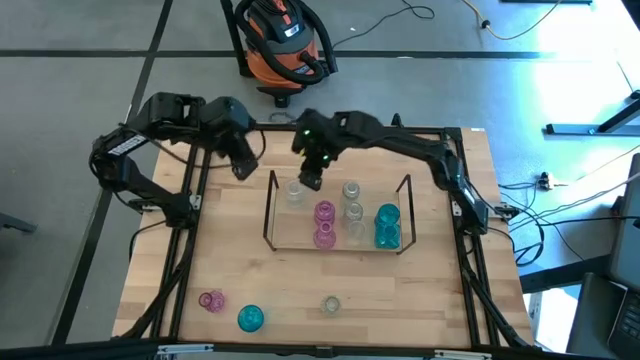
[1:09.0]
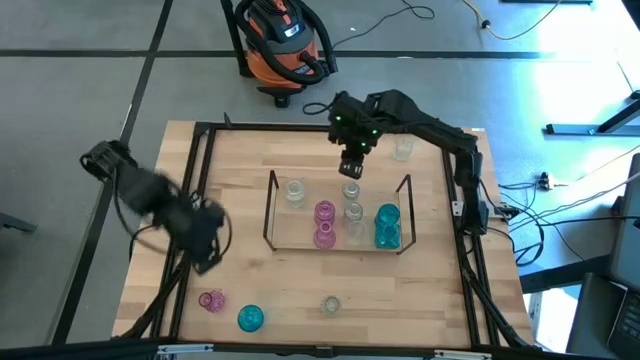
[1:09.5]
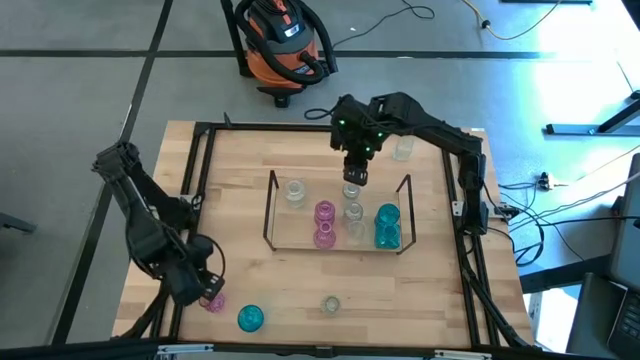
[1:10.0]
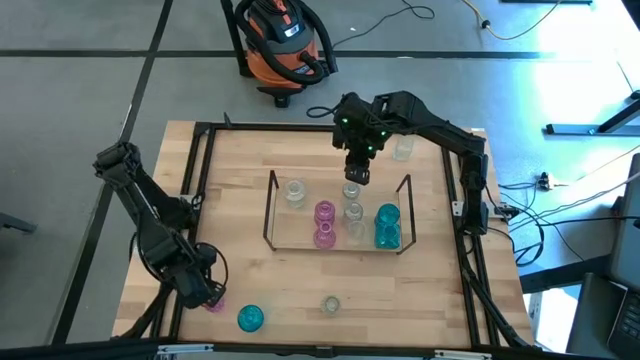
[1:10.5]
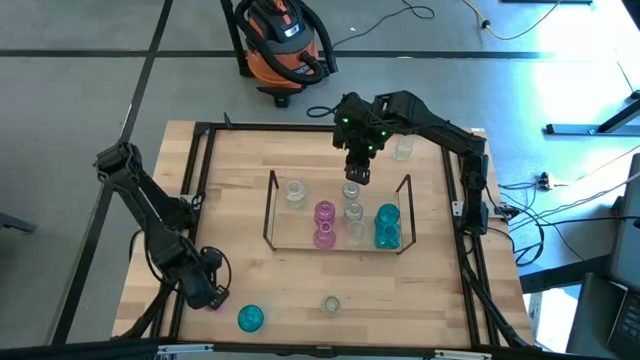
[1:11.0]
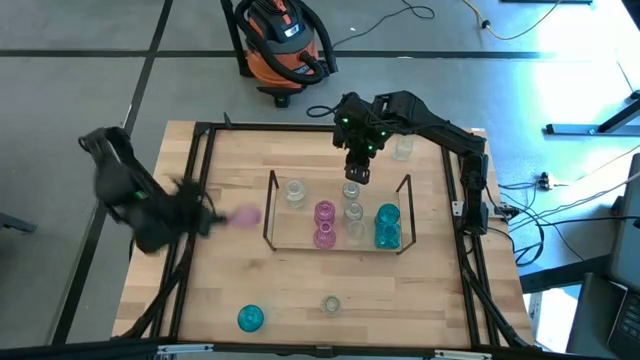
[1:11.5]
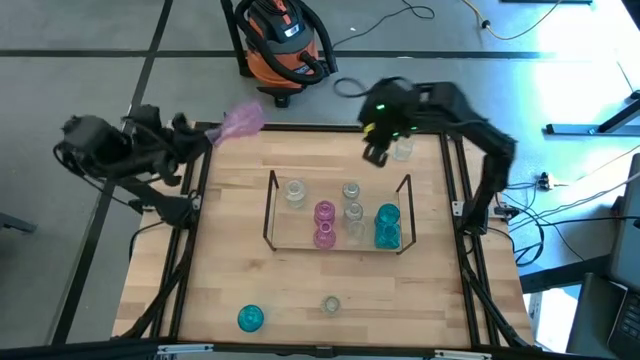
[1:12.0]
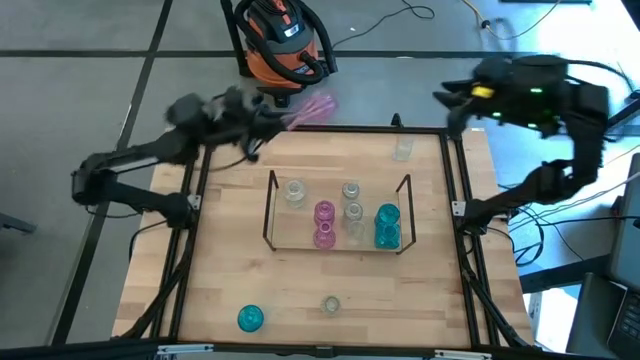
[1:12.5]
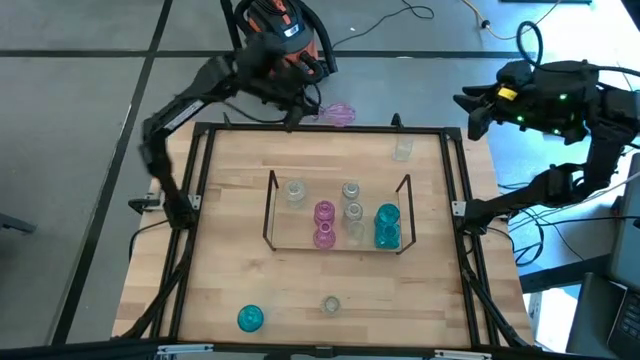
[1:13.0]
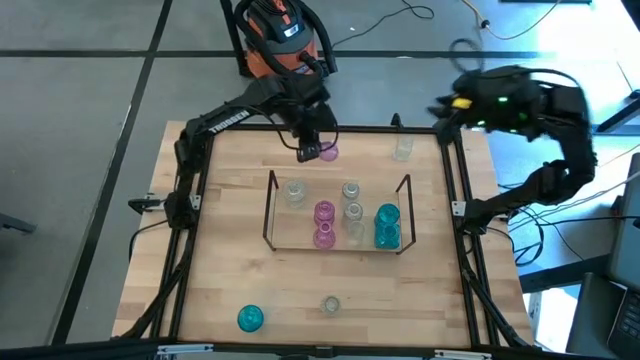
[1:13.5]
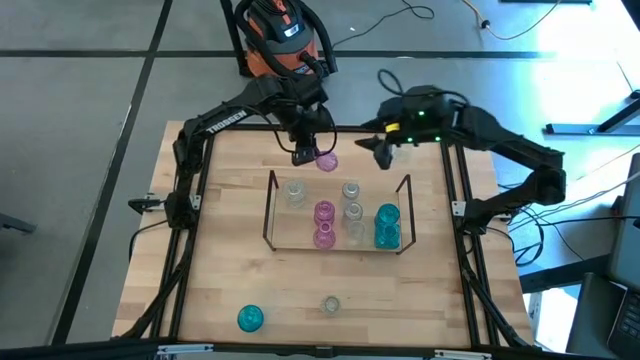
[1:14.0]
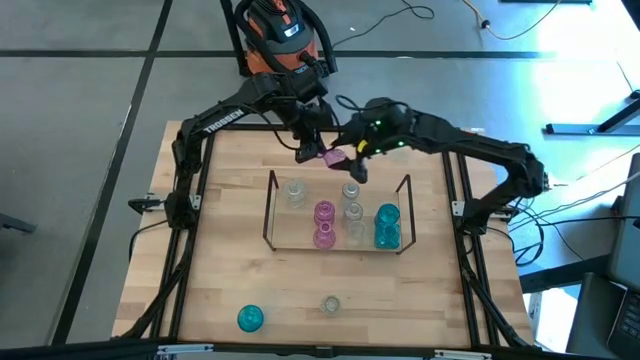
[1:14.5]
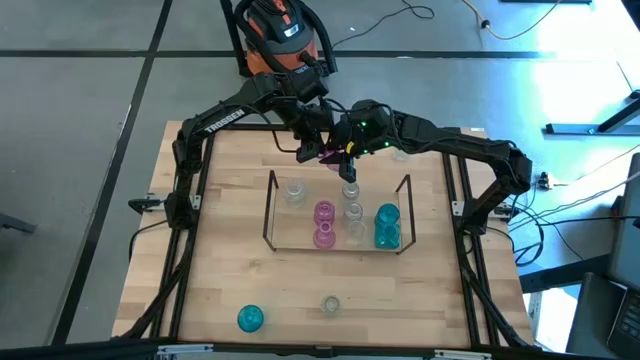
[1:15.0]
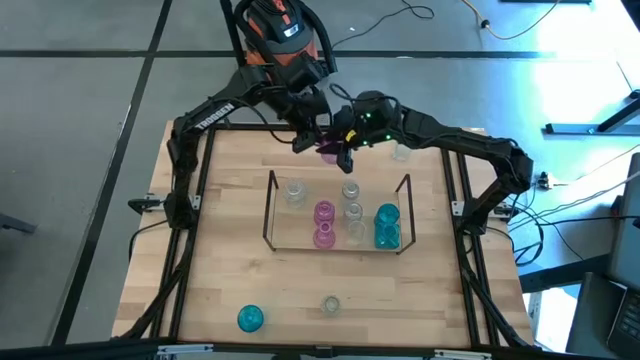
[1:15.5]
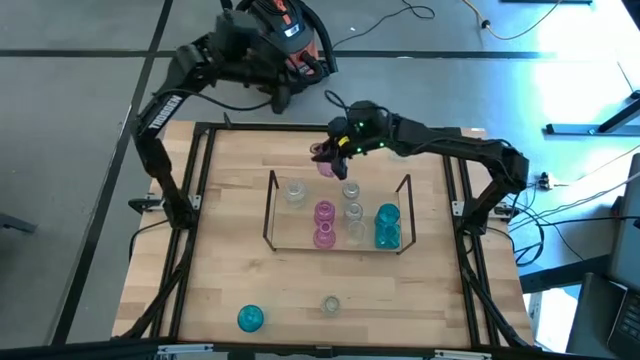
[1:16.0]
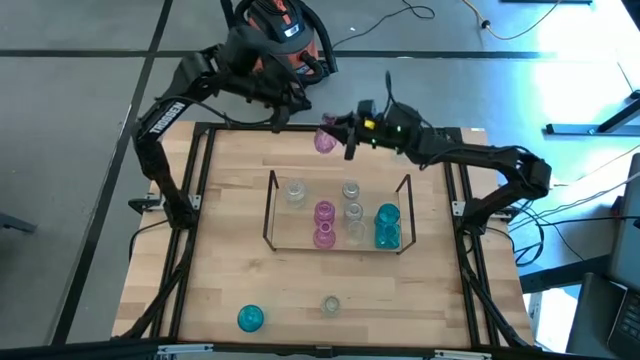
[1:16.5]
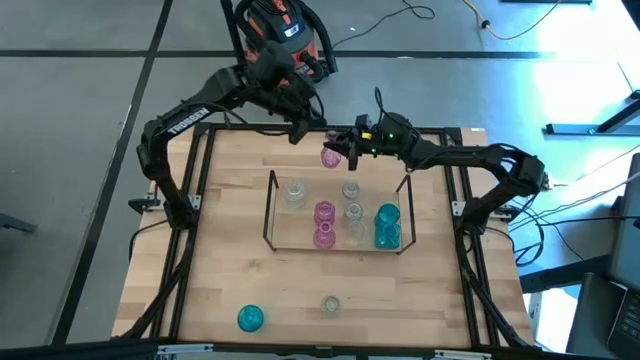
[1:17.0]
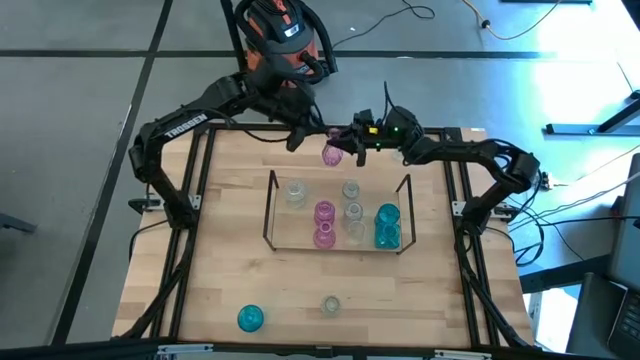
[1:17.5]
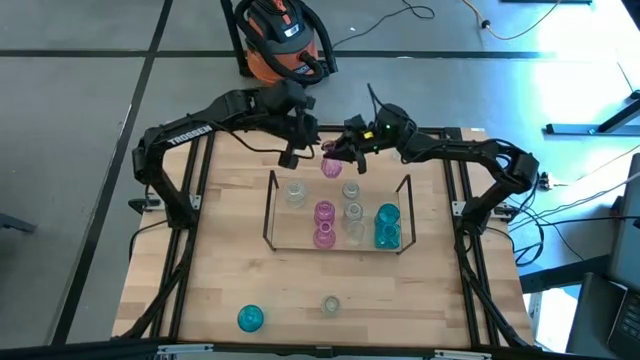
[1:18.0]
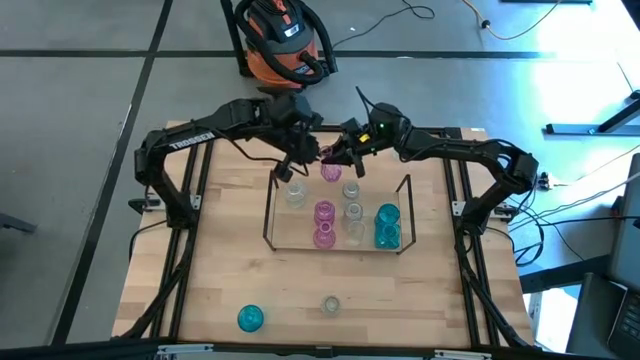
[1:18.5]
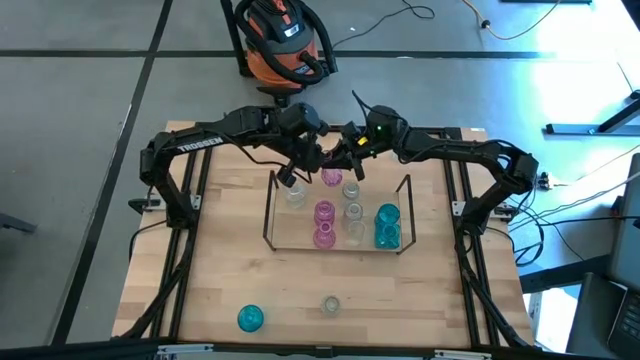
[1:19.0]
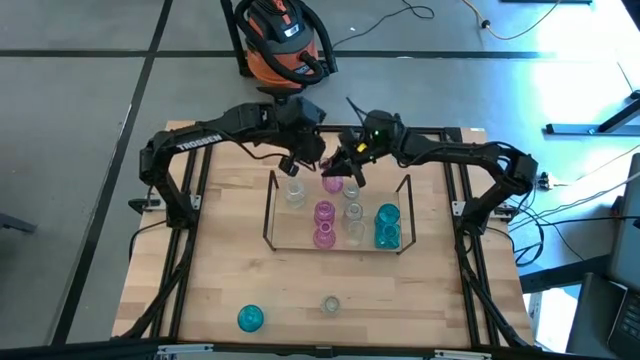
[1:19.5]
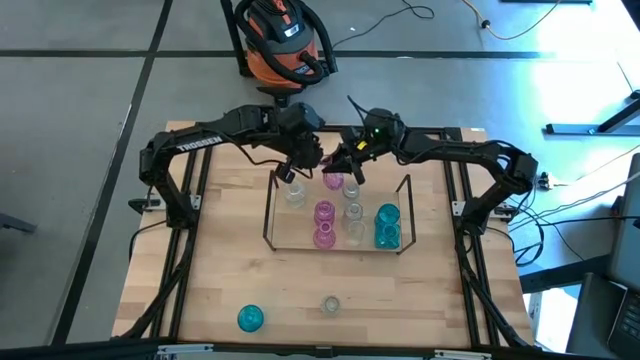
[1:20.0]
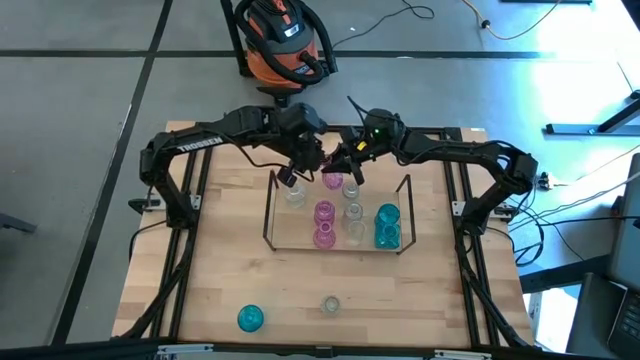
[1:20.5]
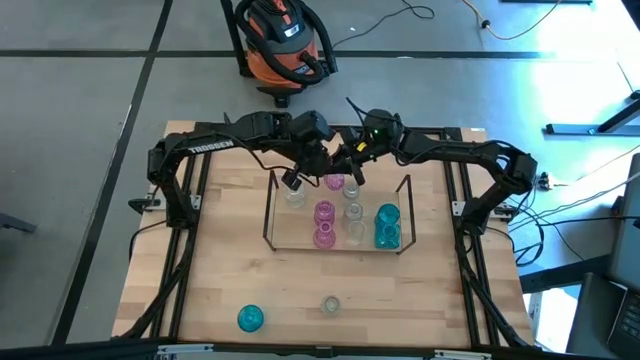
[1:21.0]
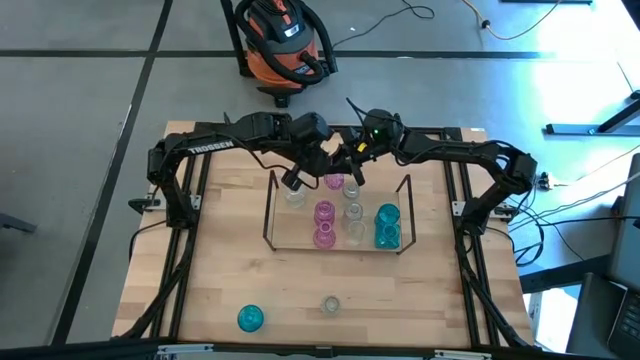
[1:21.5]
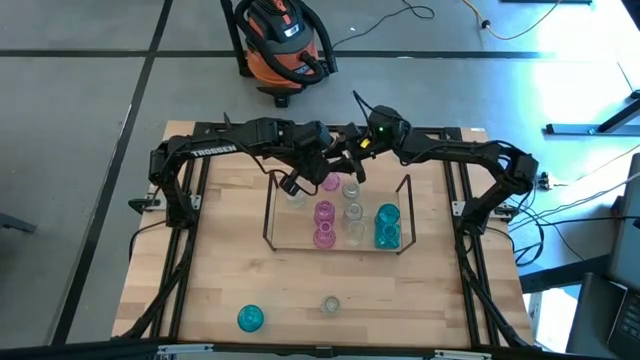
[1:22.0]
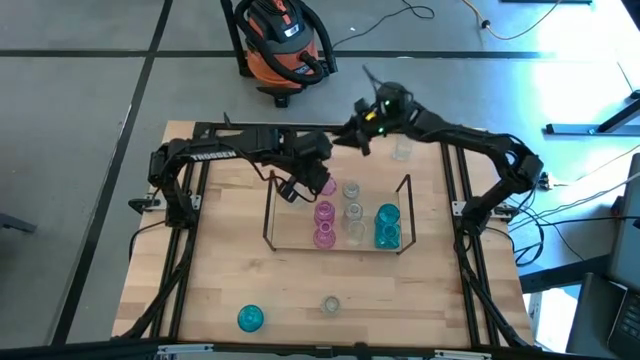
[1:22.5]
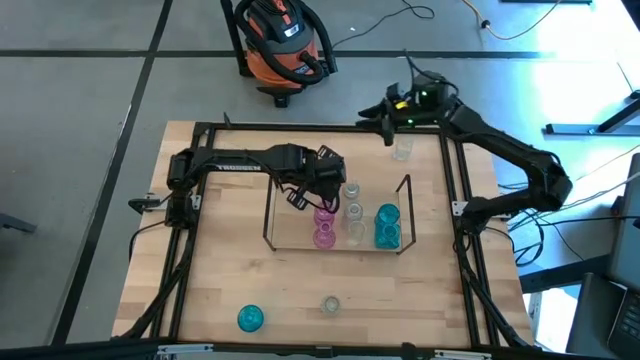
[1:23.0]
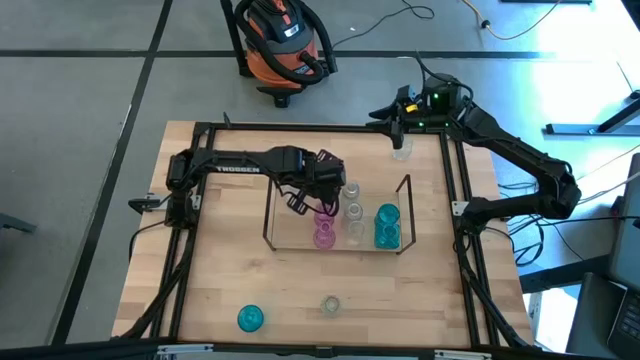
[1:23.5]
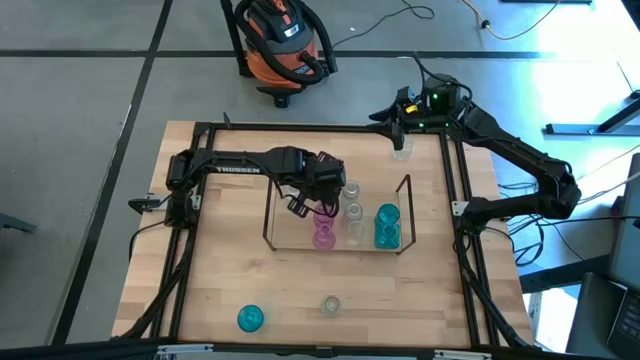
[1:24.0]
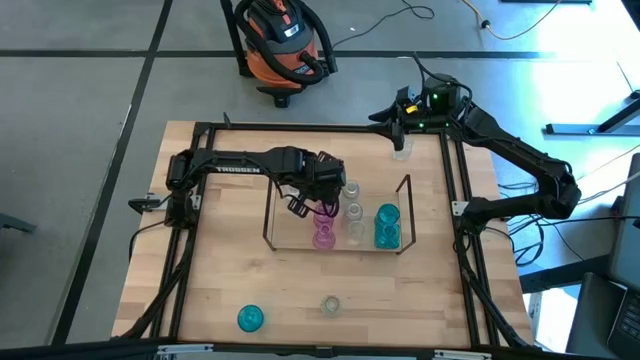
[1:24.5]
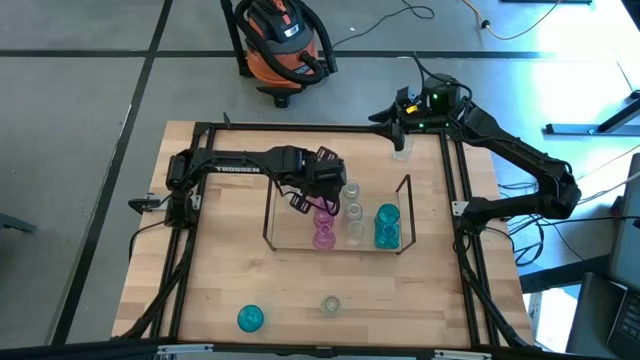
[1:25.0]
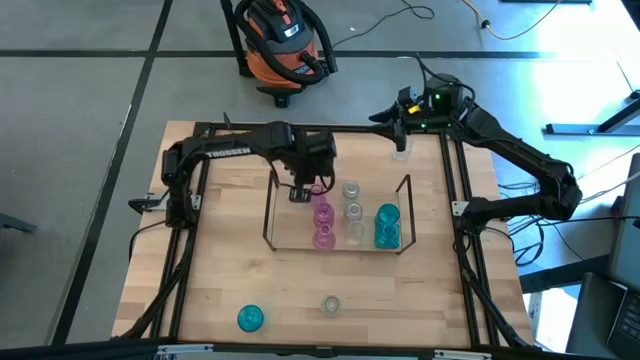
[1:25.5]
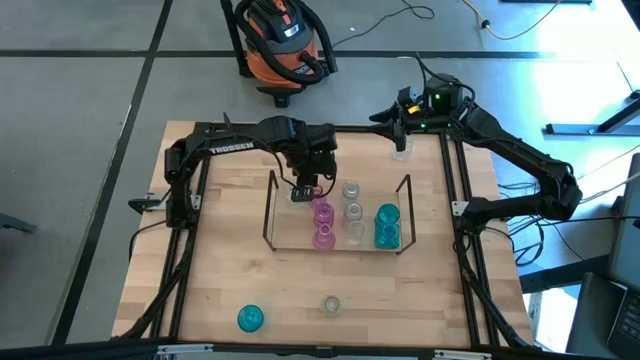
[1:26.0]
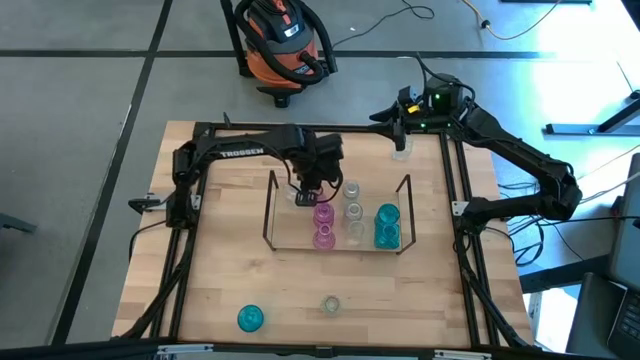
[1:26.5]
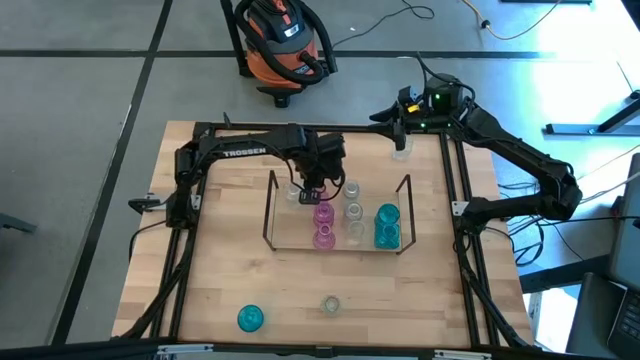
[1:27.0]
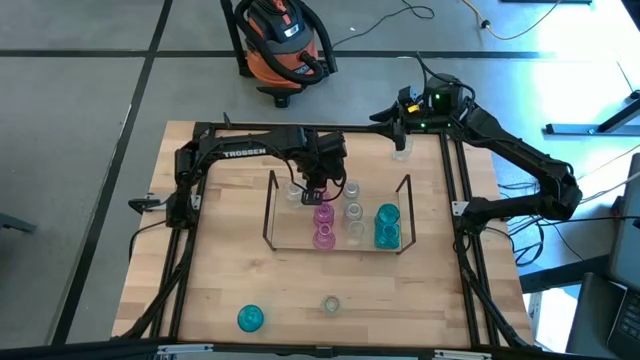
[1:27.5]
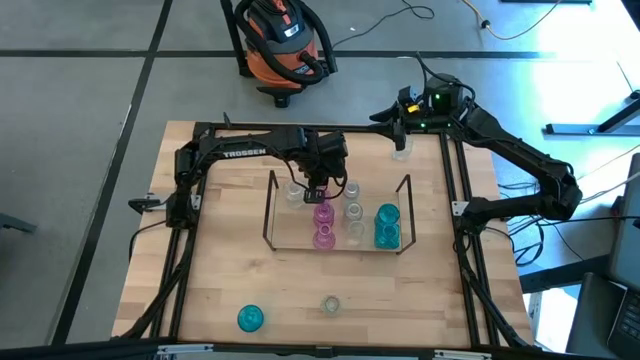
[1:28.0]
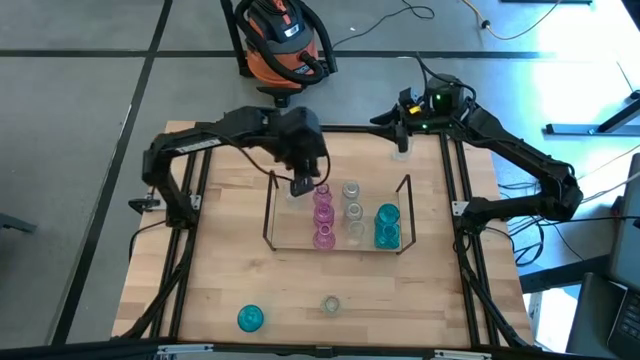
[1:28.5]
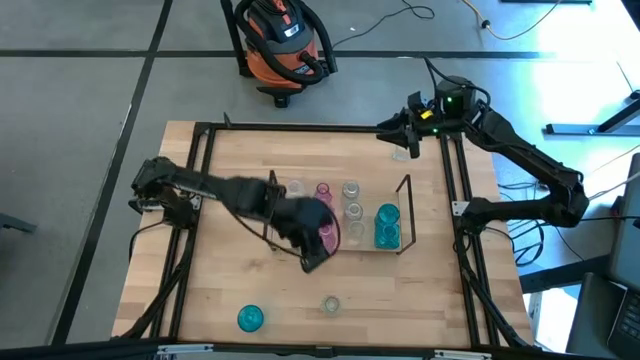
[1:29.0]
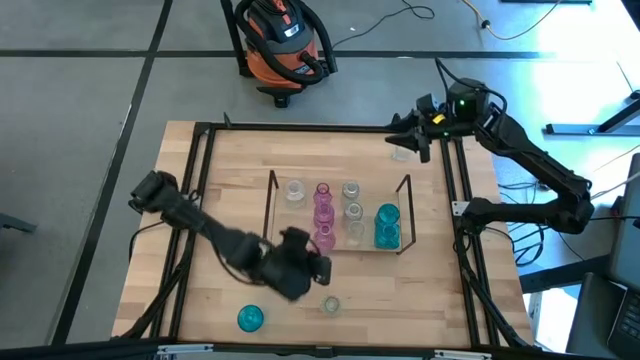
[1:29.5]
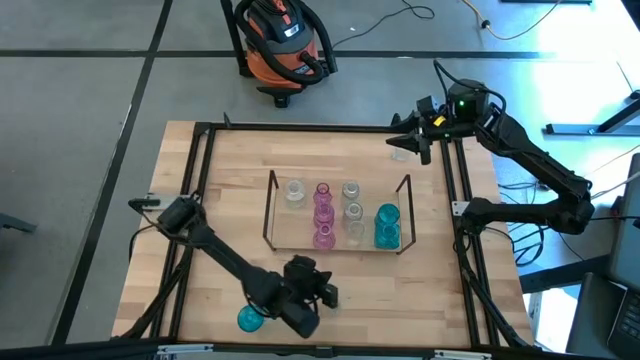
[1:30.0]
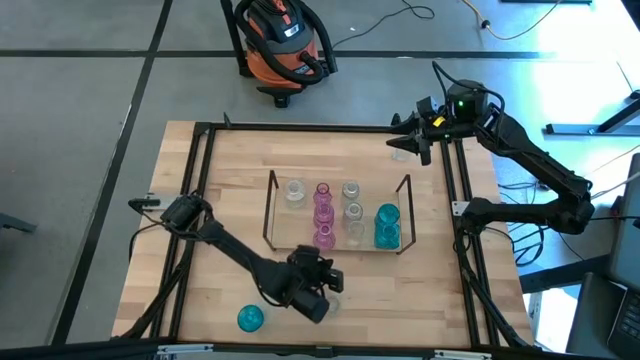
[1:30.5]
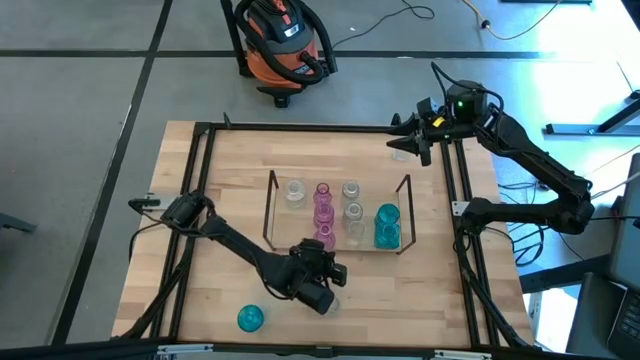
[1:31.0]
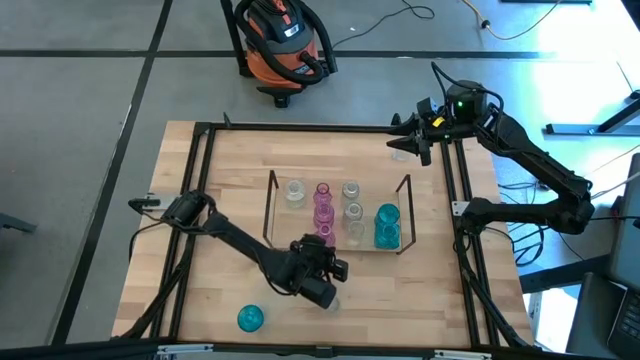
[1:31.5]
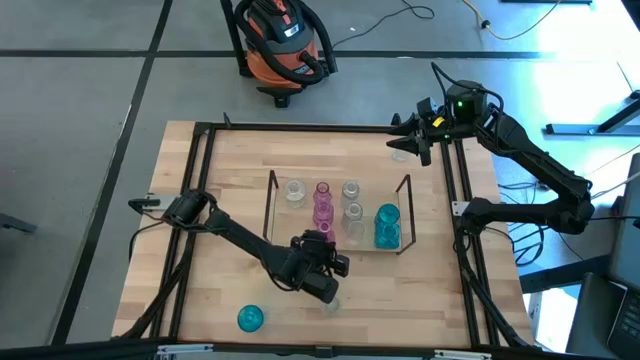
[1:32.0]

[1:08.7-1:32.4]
Task: sort vases onto shelf
Put the violet vase aligned with the other violet vase on the shelf
